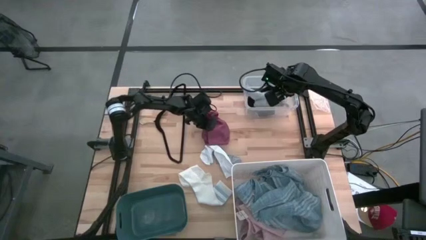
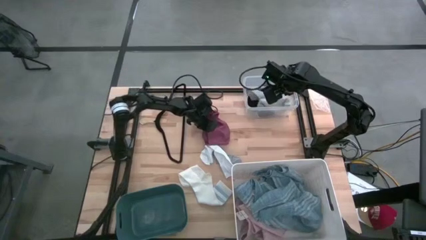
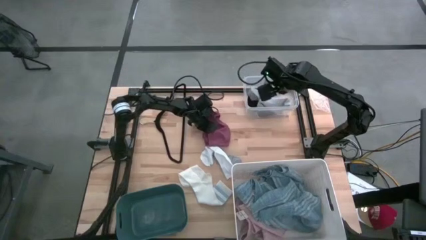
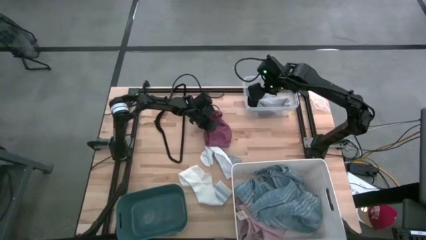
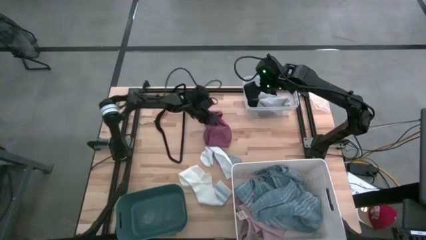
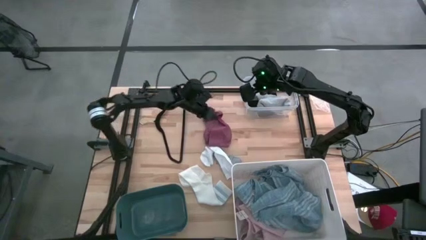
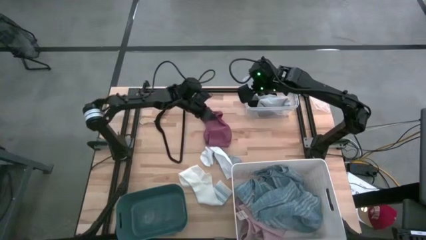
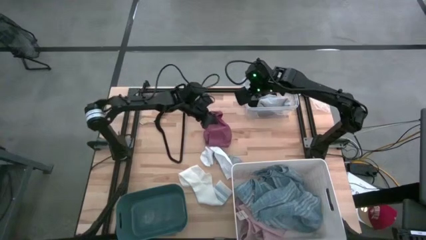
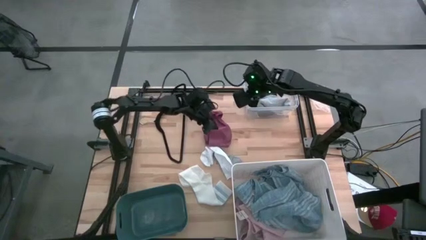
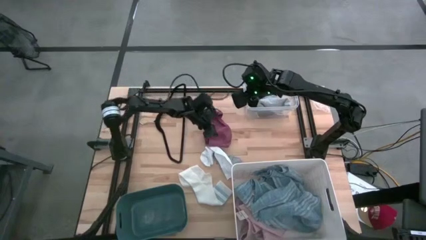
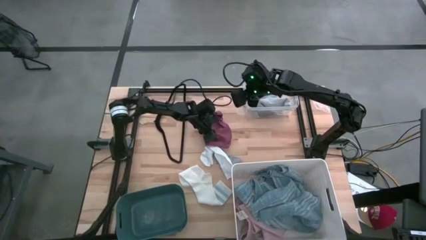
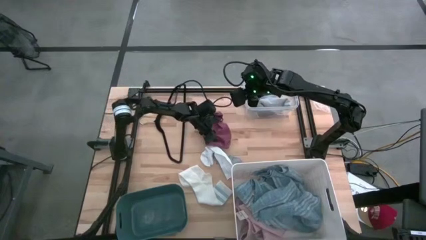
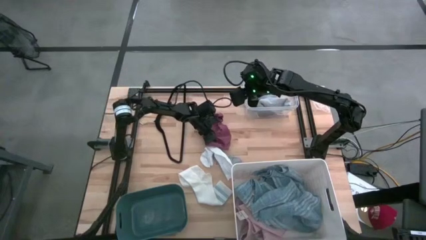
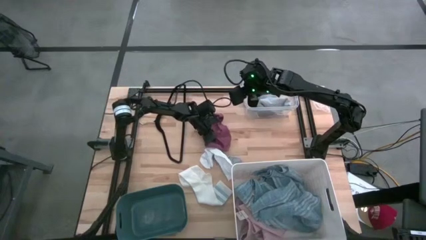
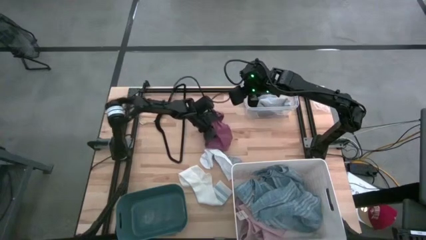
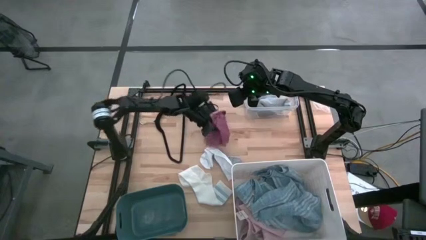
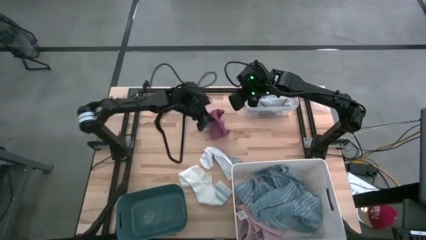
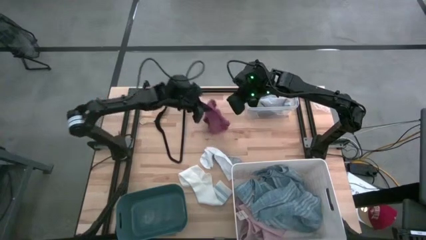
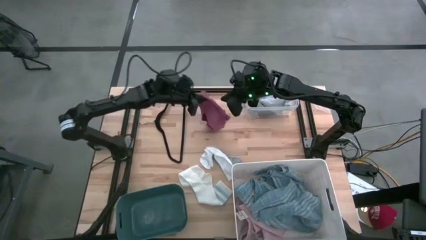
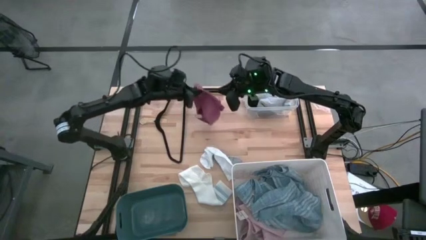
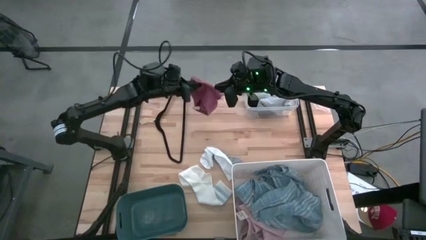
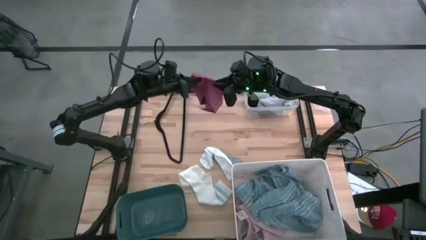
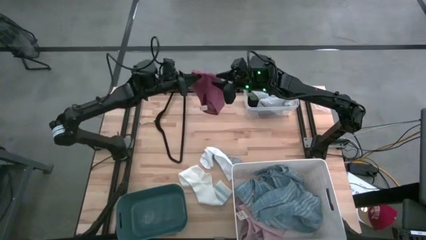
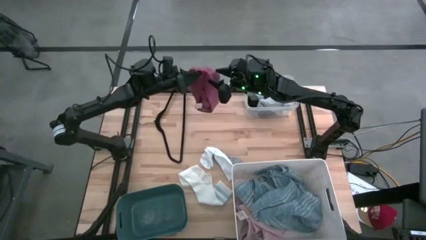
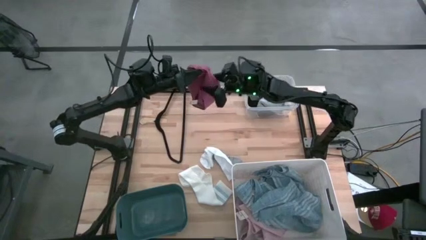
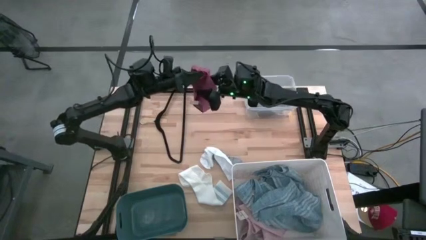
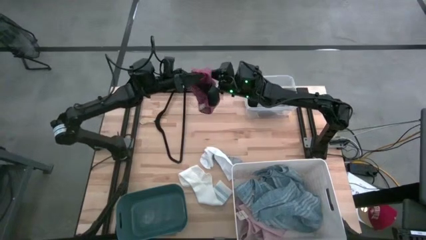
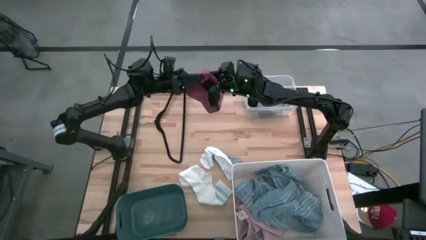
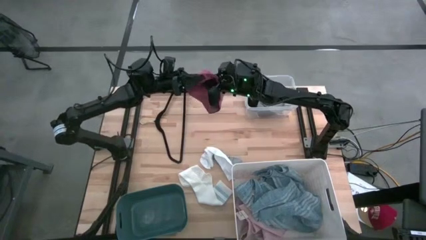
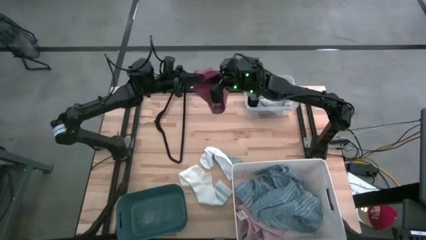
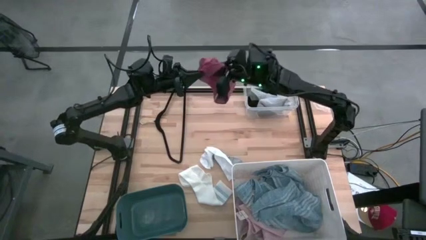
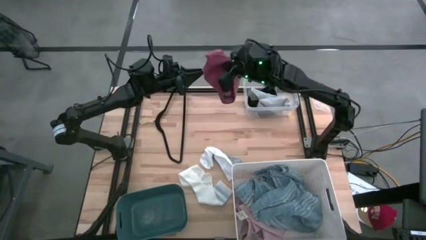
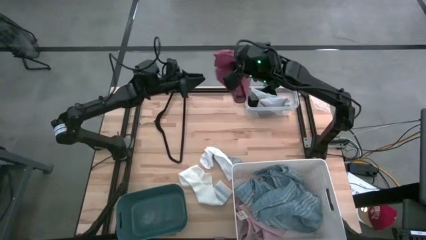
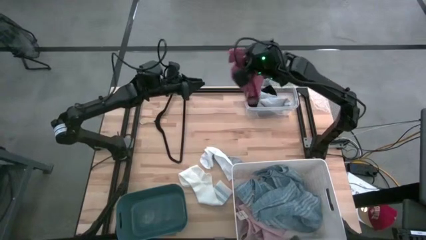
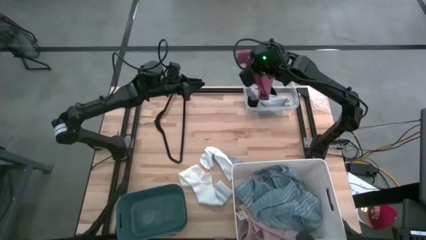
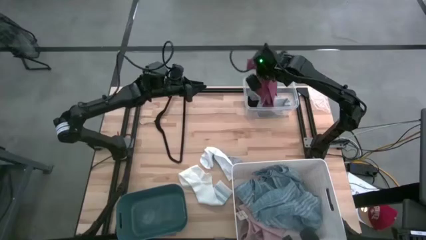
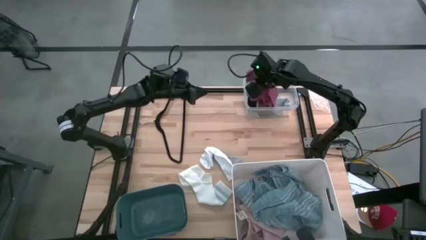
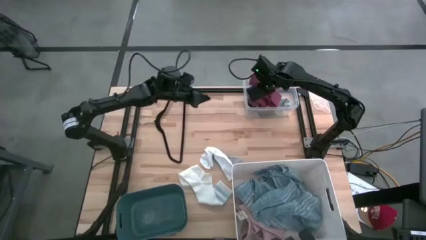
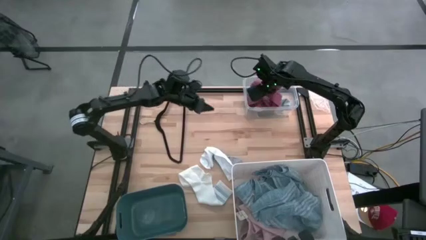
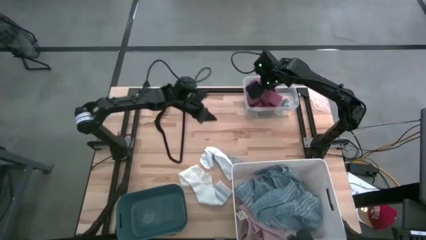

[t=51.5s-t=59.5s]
Task: Pick & Place Cloths
Put the red boxer into the transparent bin

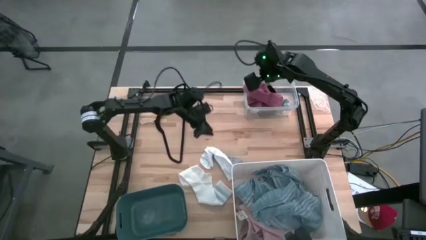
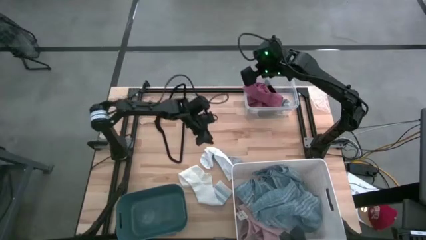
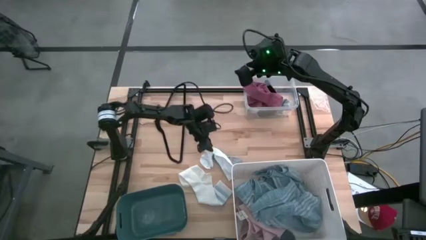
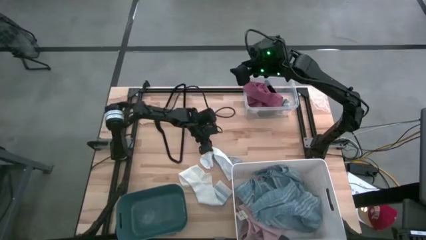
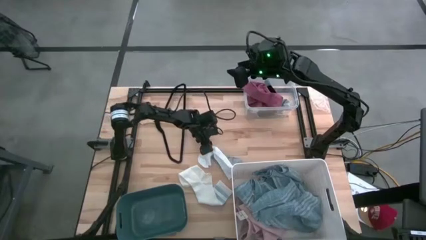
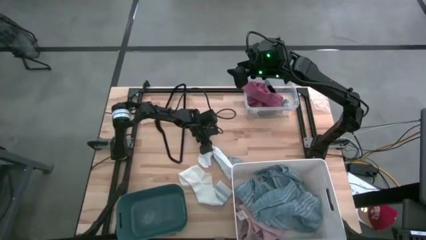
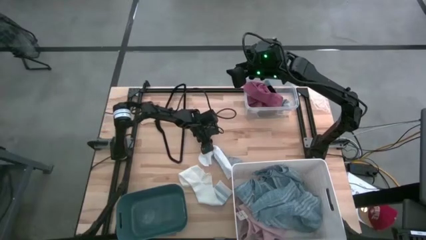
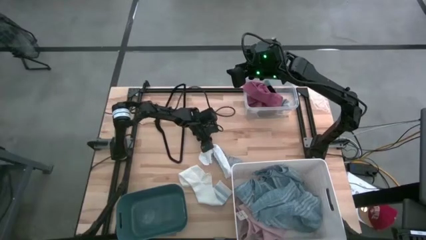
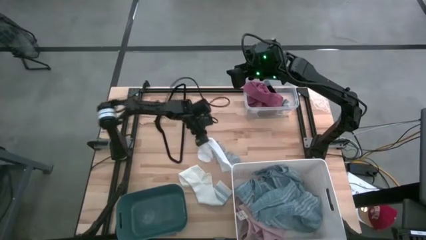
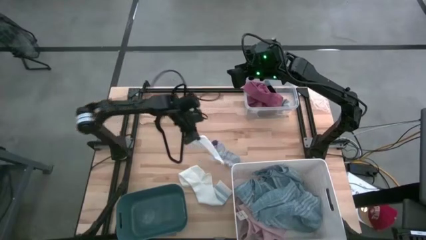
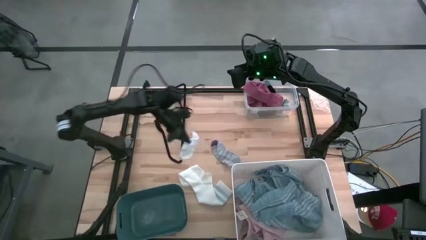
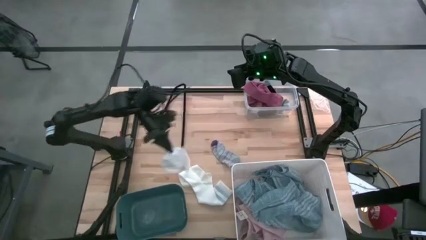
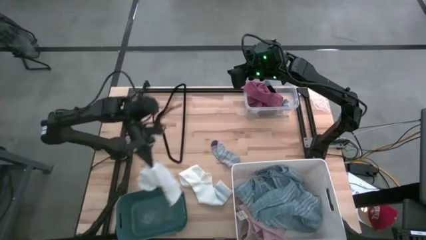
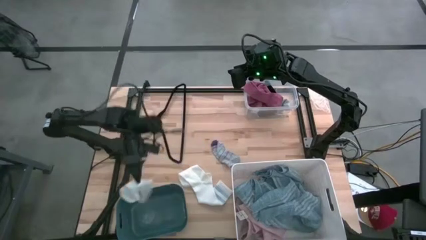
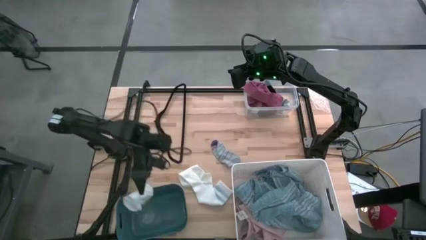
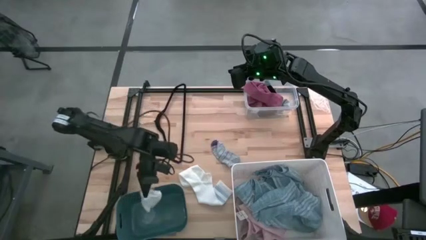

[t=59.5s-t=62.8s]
Put the white sock into the blue bin

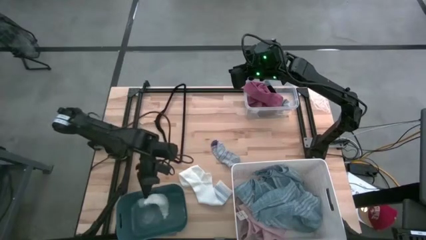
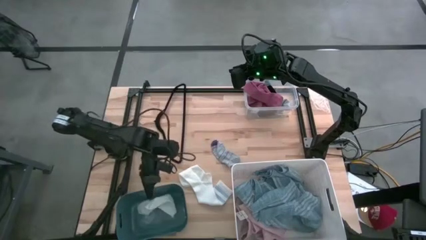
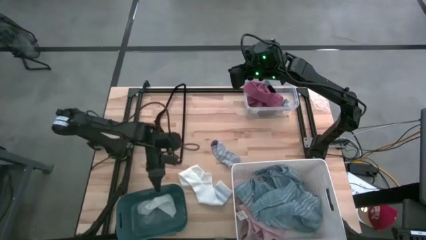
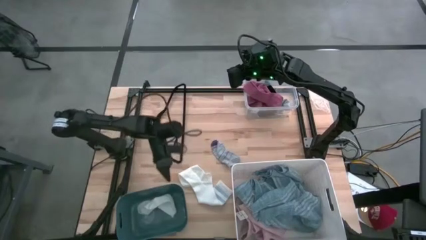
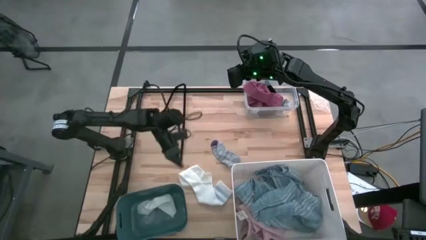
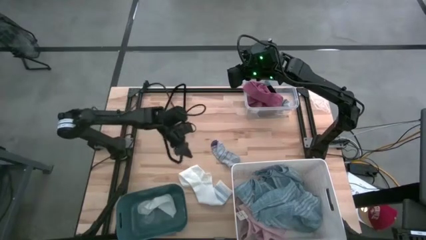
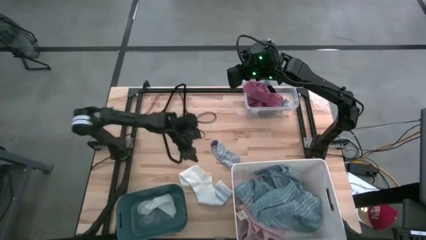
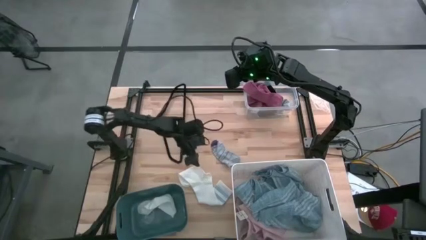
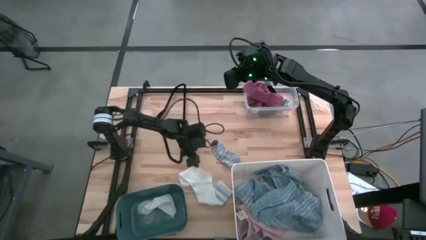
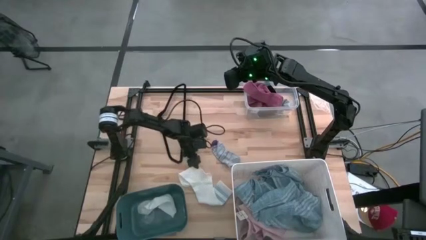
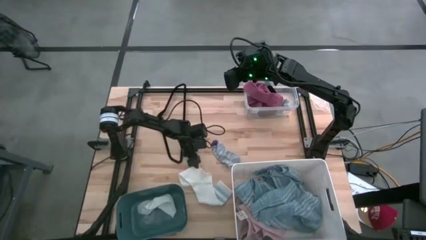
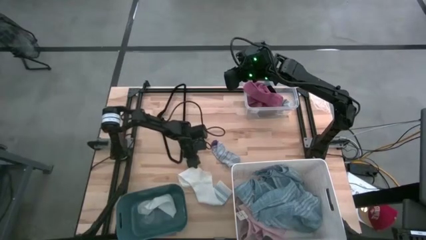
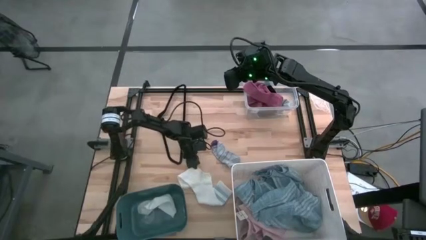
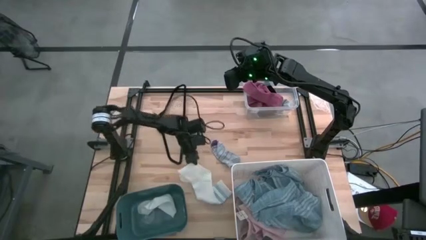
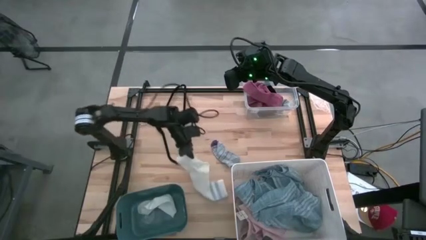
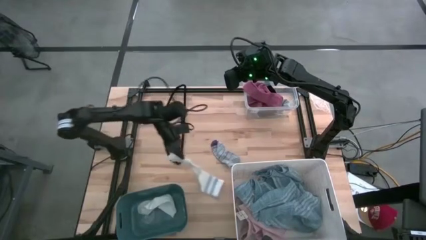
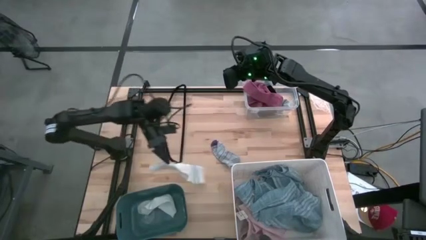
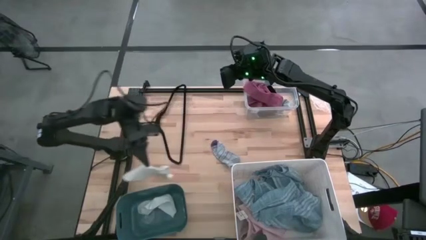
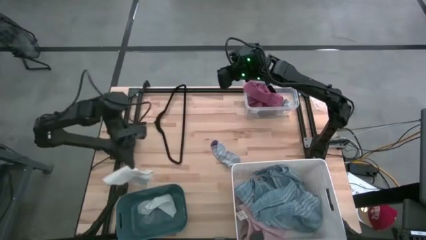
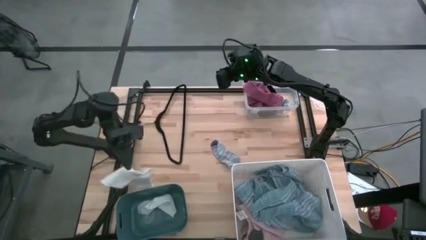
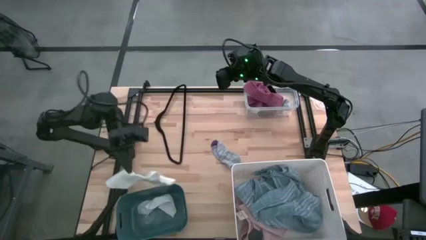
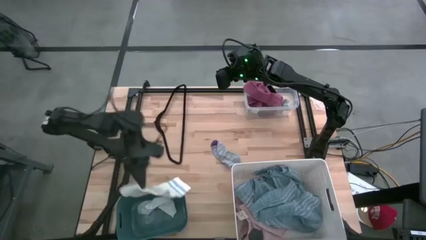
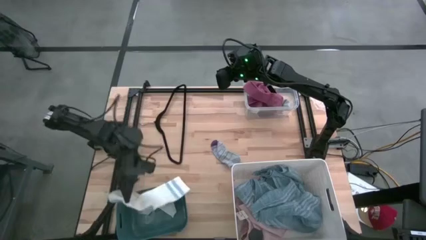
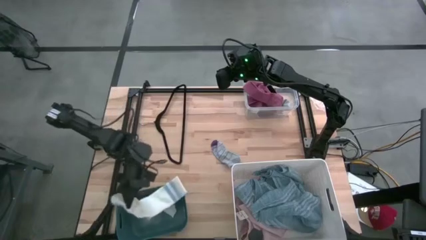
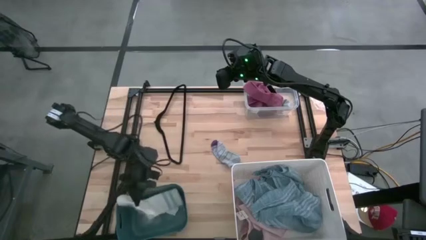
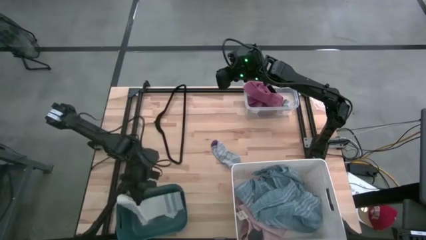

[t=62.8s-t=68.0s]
Put the white blue sock into the blue bin
